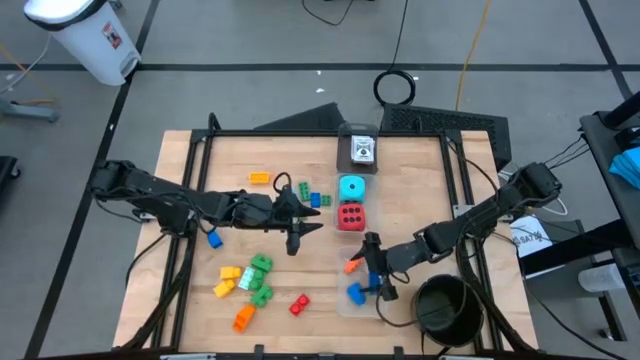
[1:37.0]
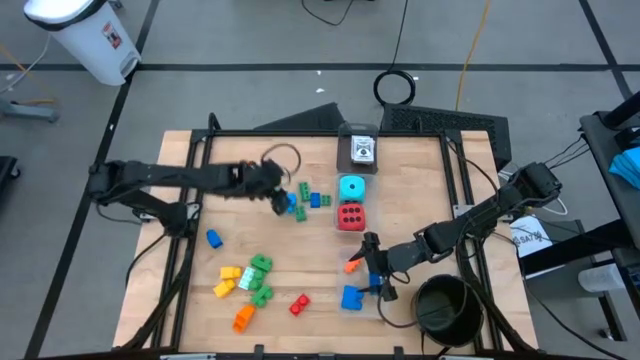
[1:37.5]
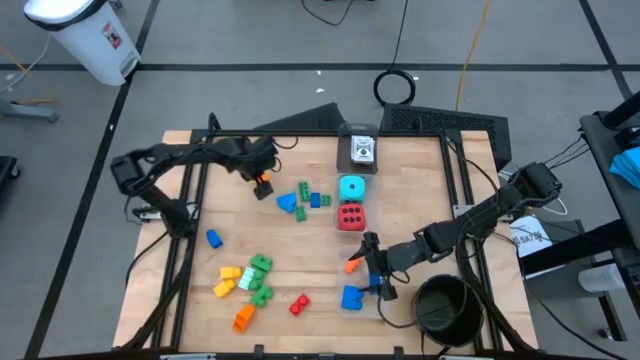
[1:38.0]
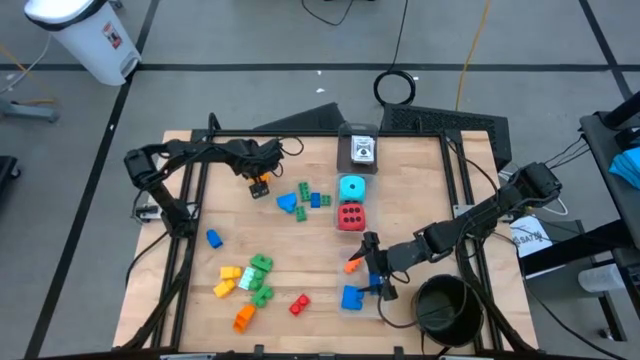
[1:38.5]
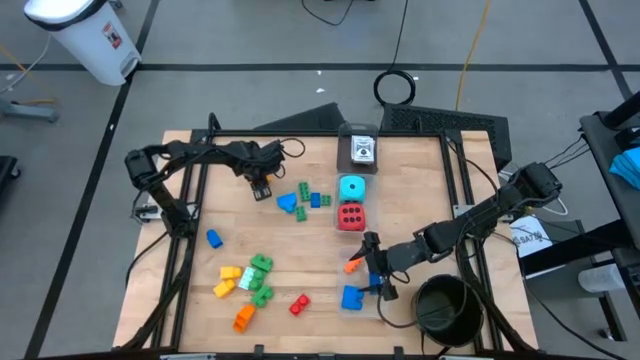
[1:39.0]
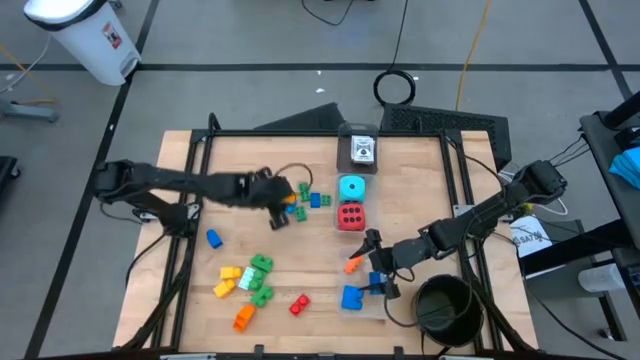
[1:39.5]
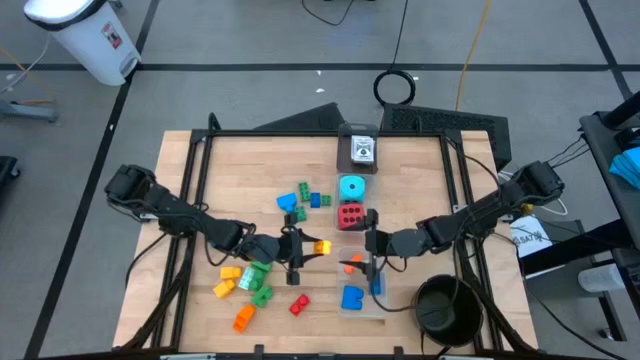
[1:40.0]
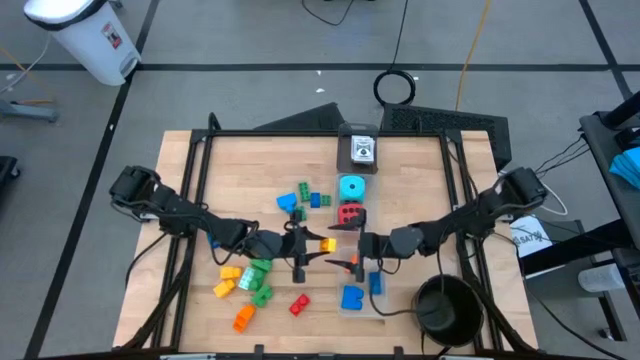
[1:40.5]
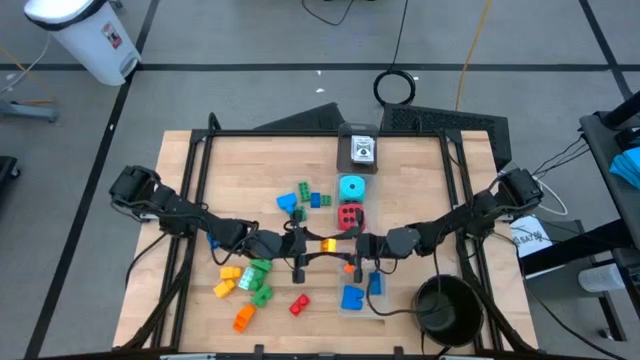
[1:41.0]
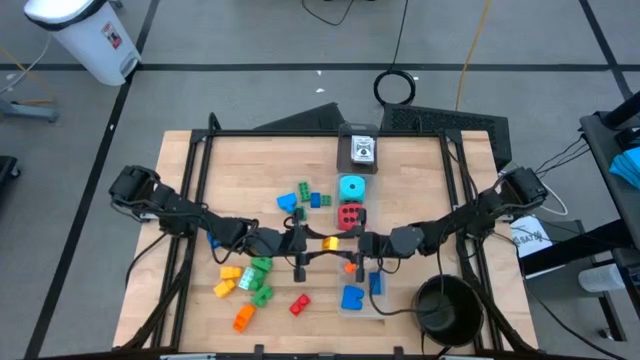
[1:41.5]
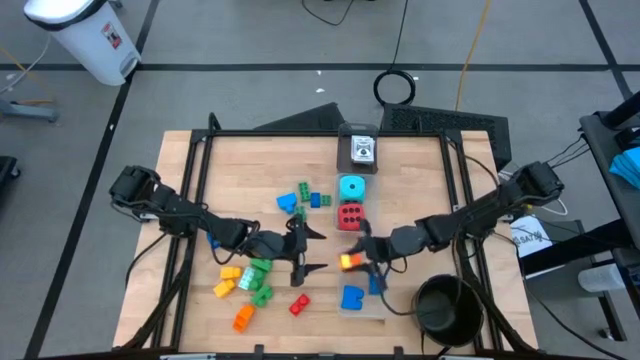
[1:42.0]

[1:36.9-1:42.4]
Task: Pick & Place Toys
Put the yellow 8 stud game piece into the bottom transparent bin

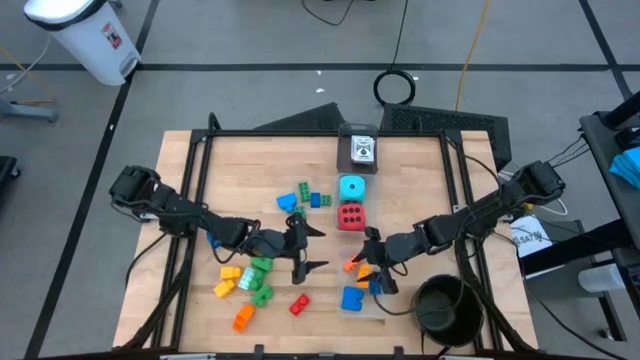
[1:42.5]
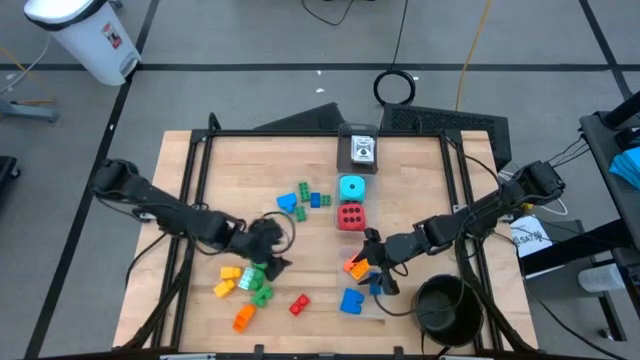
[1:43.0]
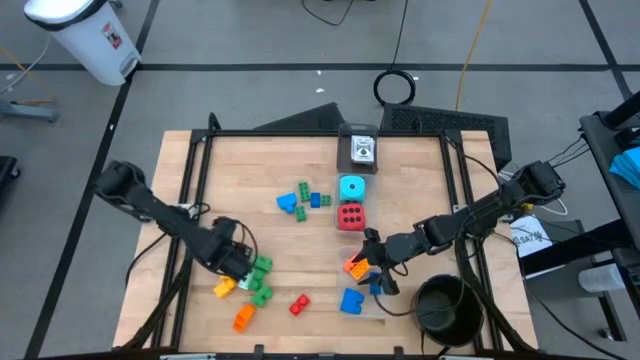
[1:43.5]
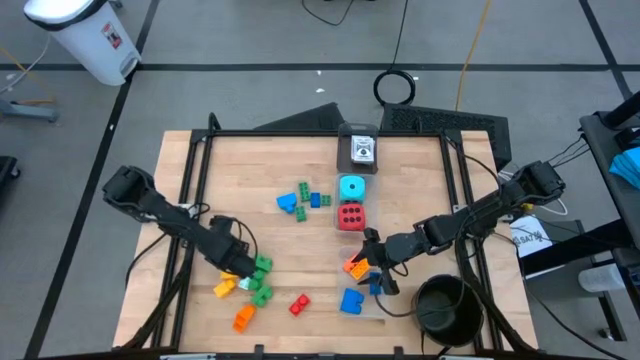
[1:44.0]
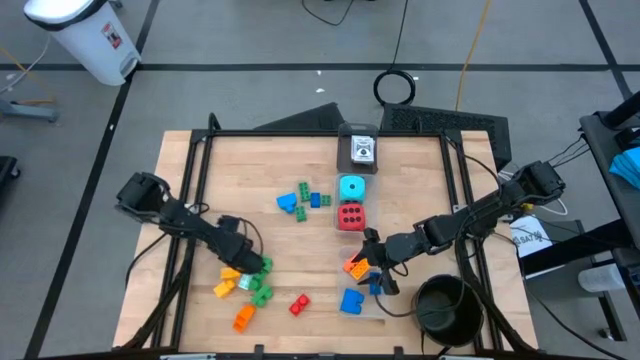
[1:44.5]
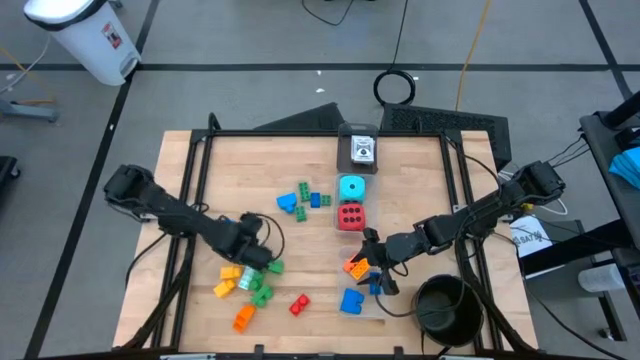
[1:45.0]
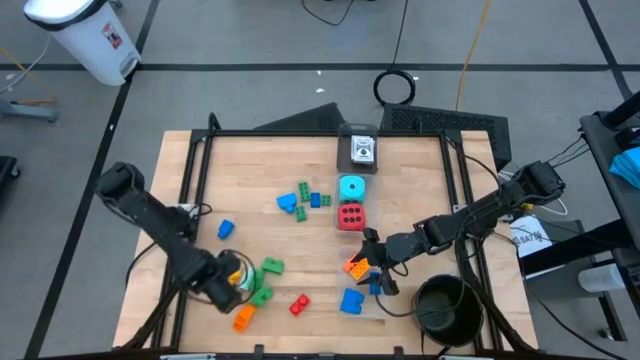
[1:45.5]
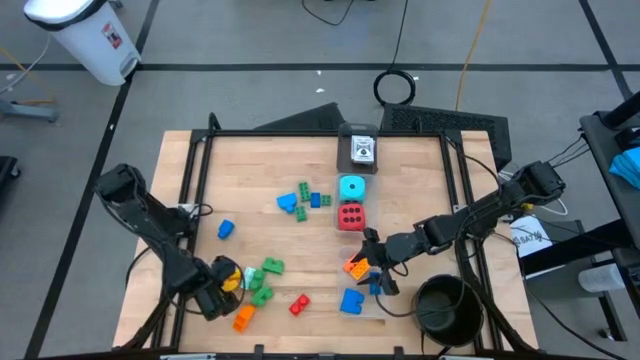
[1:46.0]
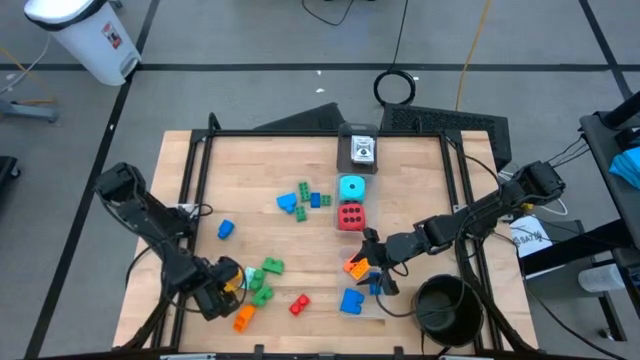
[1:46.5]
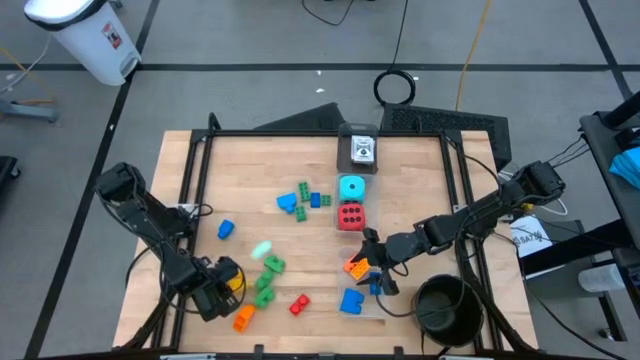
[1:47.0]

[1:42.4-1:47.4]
Put the yellow 1 stud game piece into the bottom transparent bin

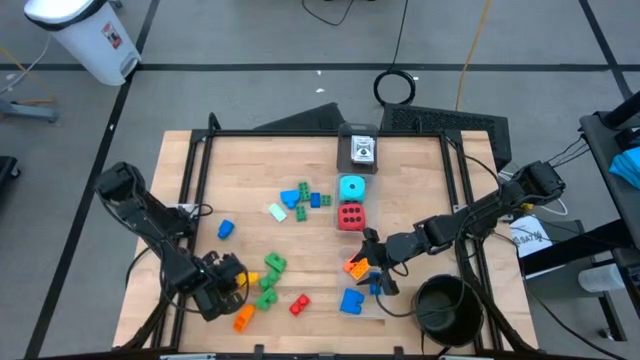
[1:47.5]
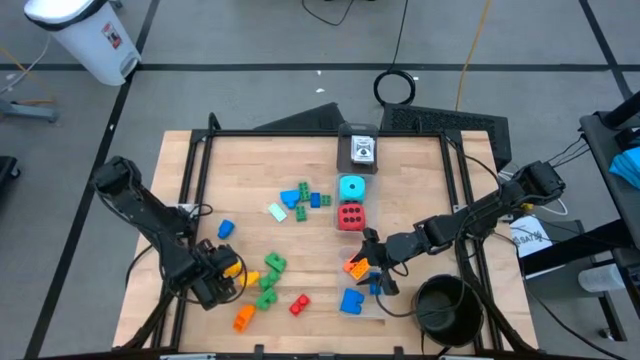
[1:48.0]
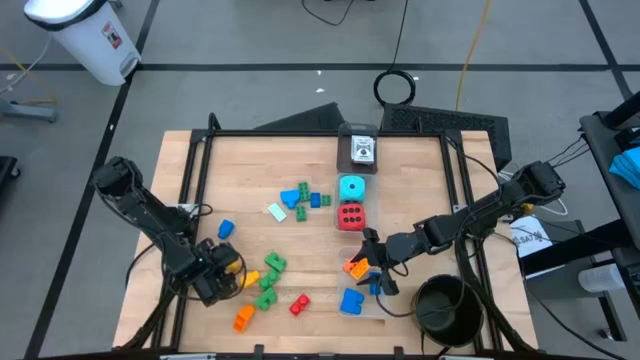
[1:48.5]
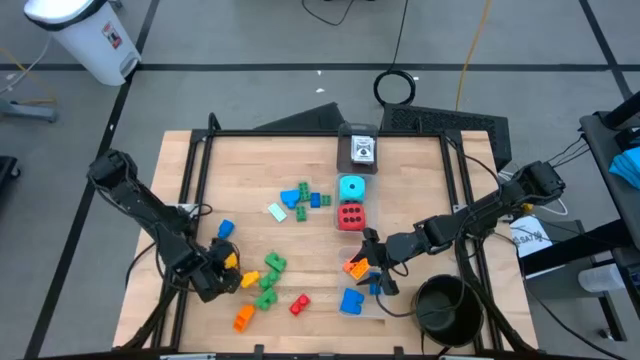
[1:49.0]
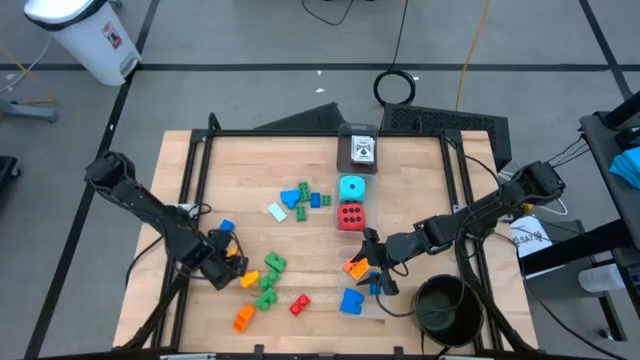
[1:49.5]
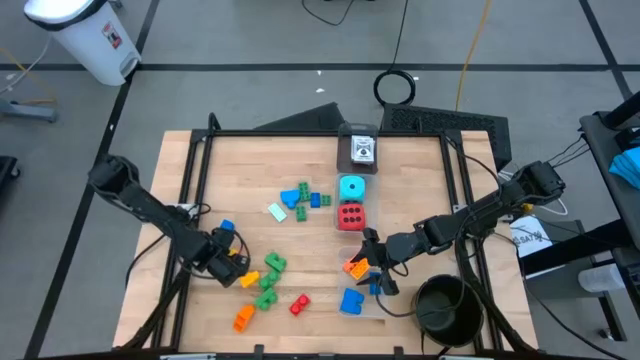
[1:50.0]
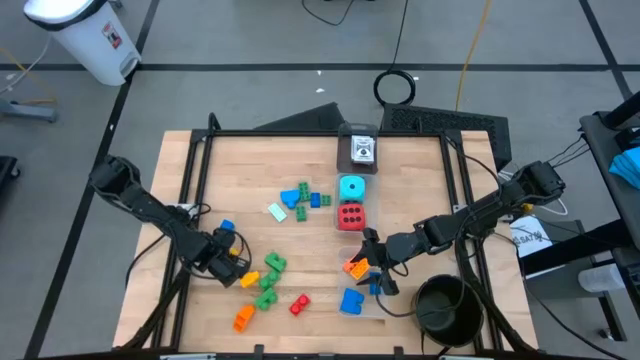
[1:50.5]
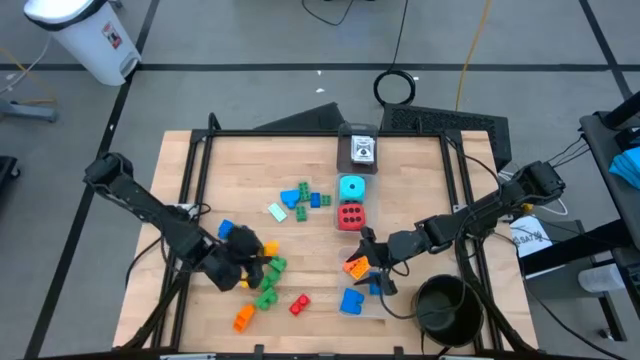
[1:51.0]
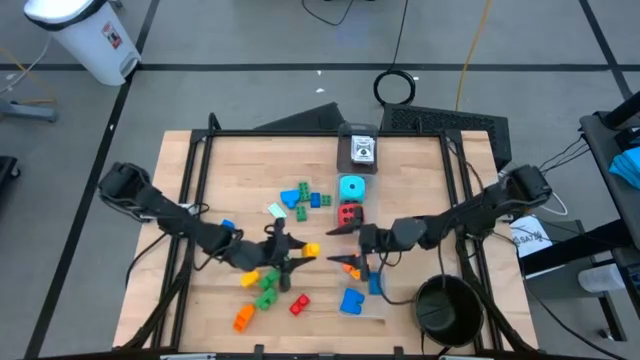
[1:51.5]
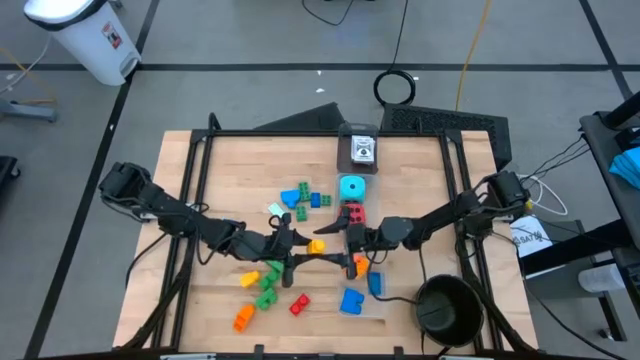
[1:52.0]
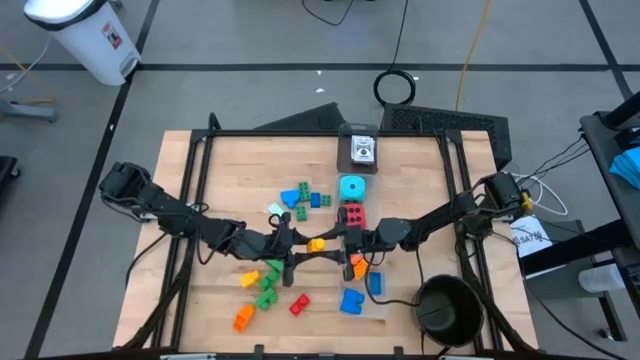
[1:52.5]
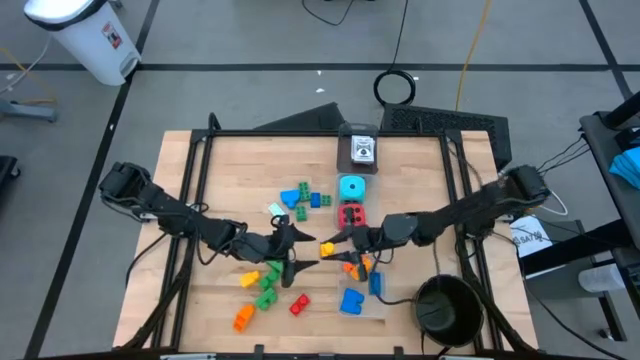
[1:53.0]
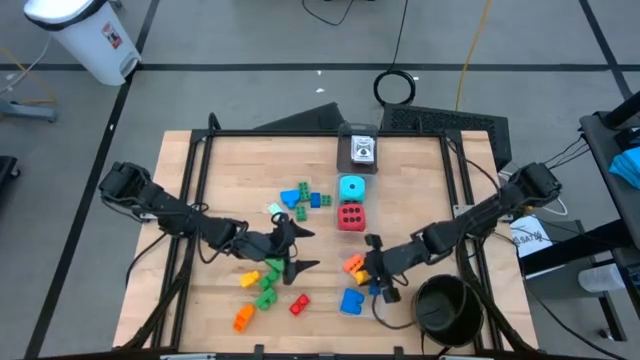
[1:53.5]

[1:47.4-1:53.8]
Put the yellow 1 stud game piece into the bottom transparent bin

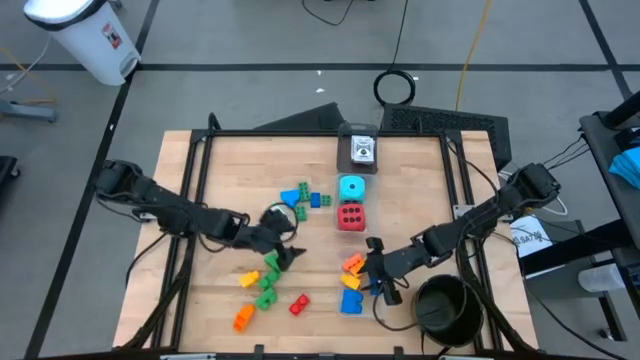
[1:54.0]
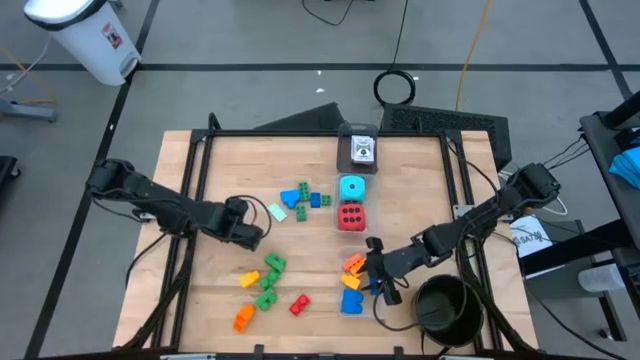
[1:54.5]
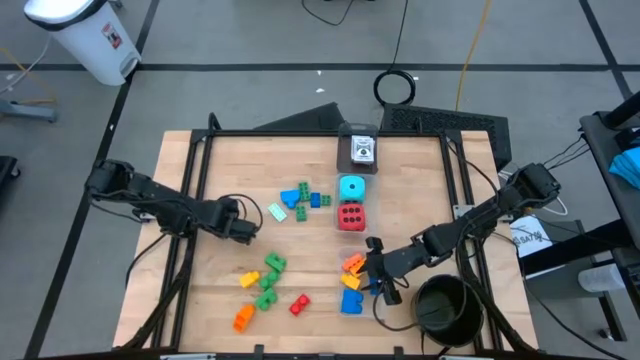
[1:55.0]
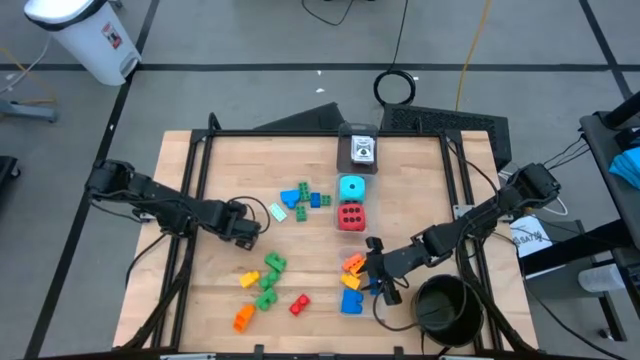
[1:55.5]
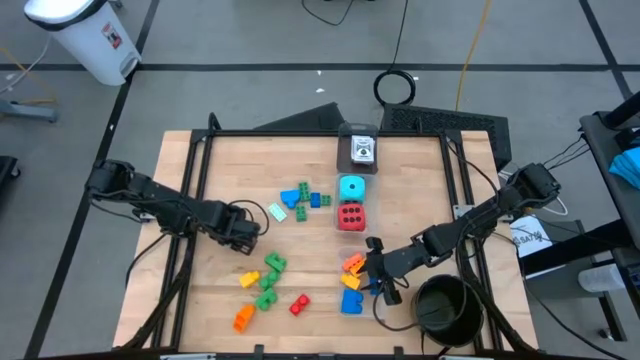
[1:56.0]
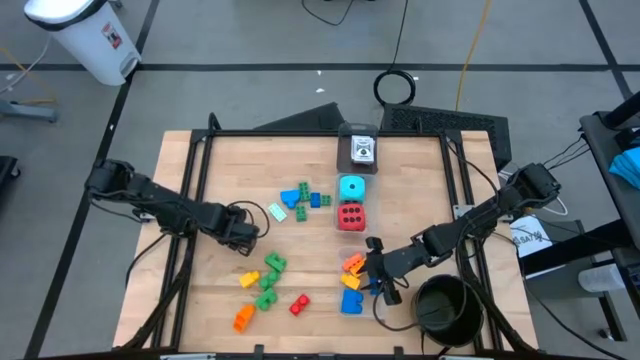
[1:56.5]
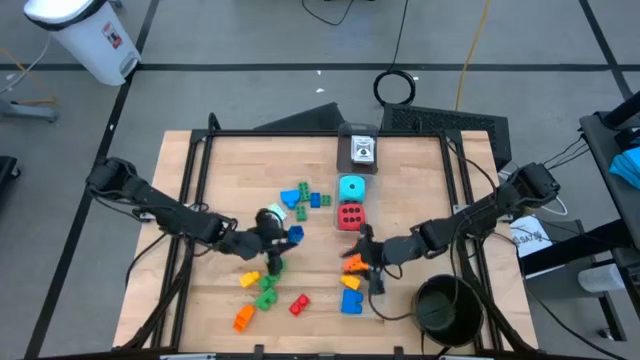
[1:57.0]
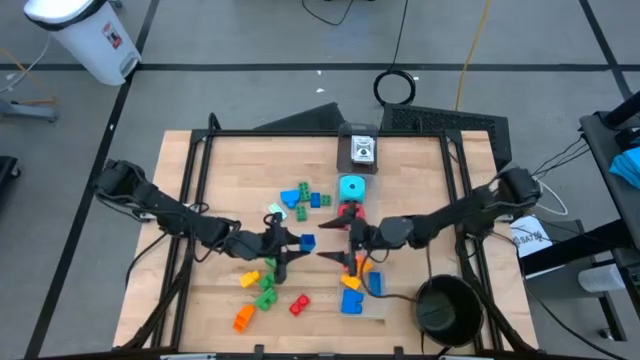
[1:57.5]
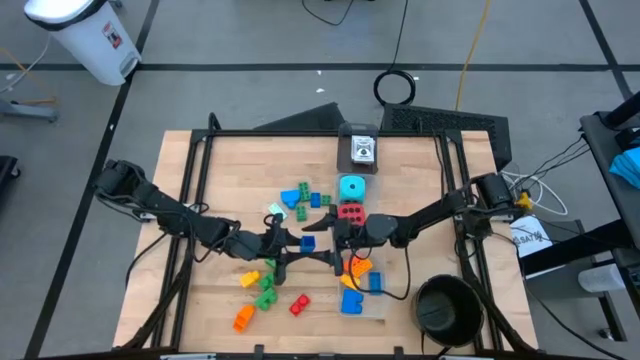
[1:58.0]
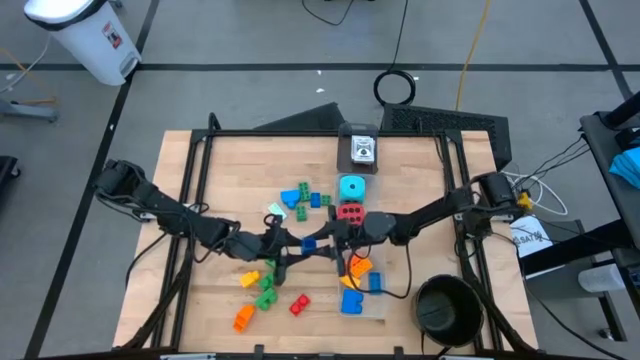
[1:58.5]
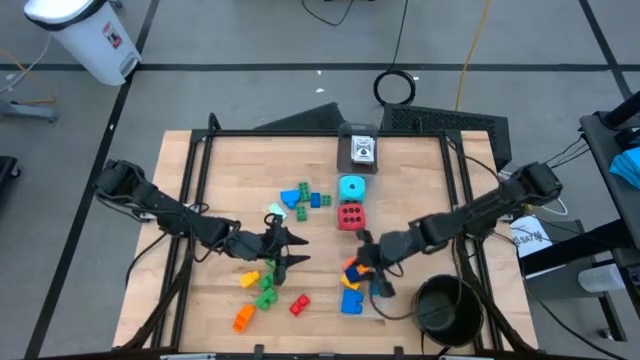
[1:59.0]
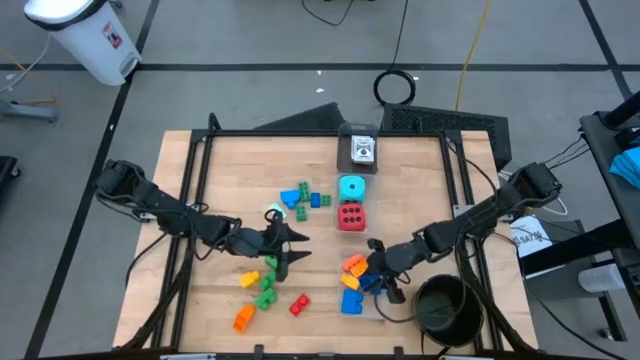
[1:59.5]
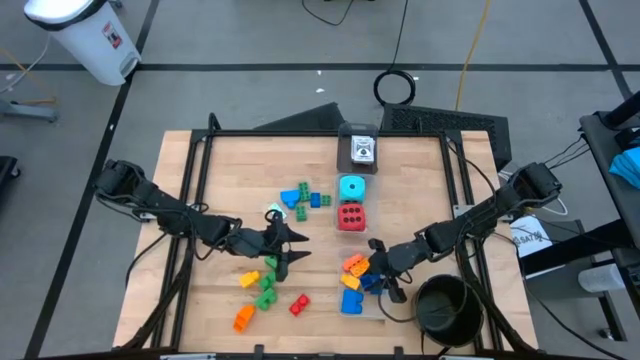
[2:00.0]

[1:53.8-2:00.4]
Put the blue 1 stud game piece into the bottom transparent bin
